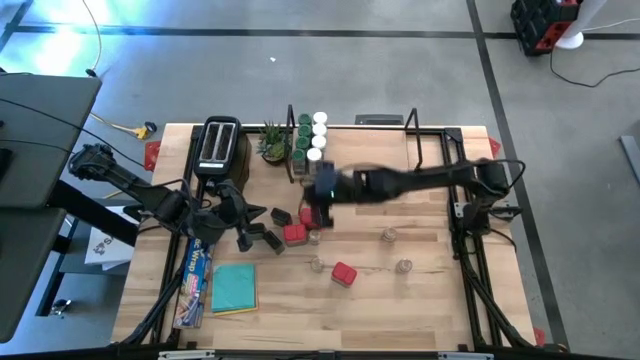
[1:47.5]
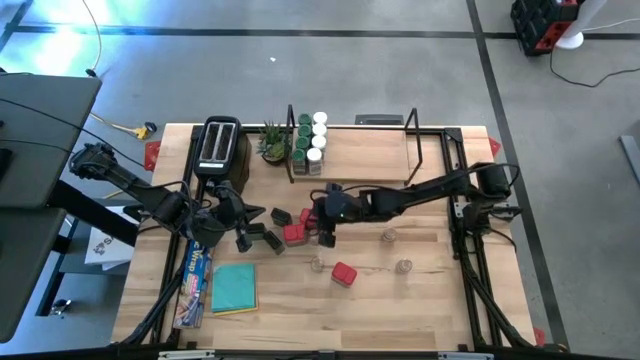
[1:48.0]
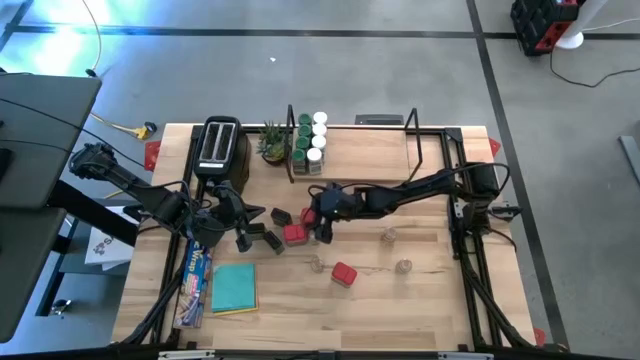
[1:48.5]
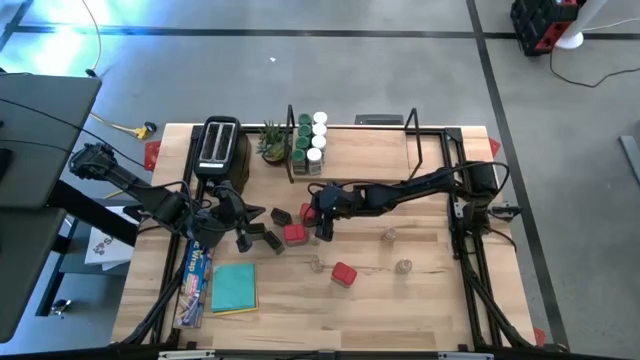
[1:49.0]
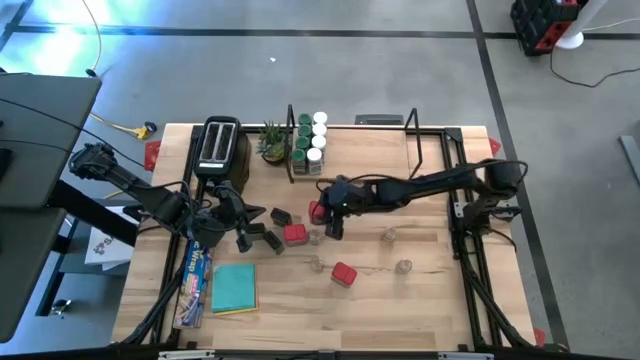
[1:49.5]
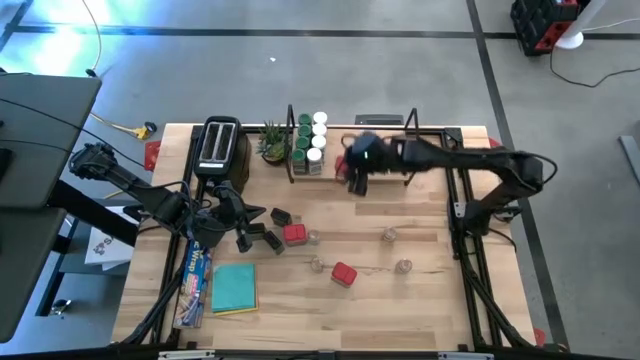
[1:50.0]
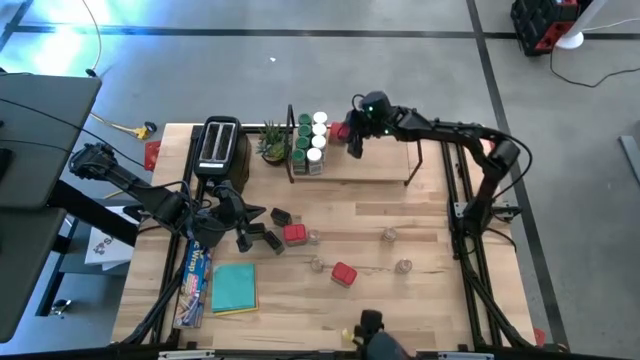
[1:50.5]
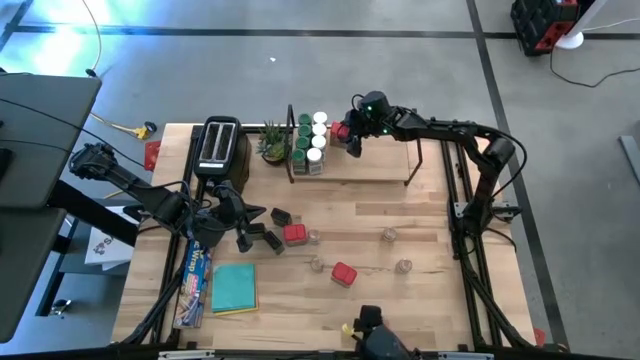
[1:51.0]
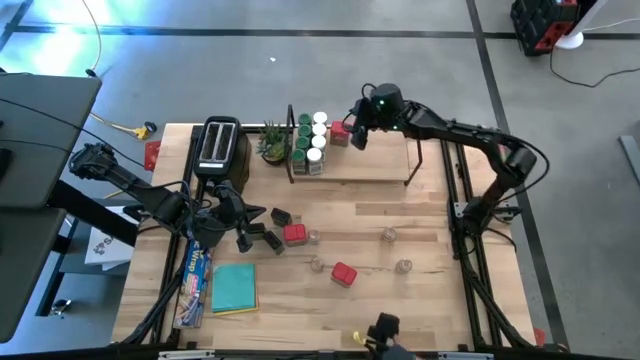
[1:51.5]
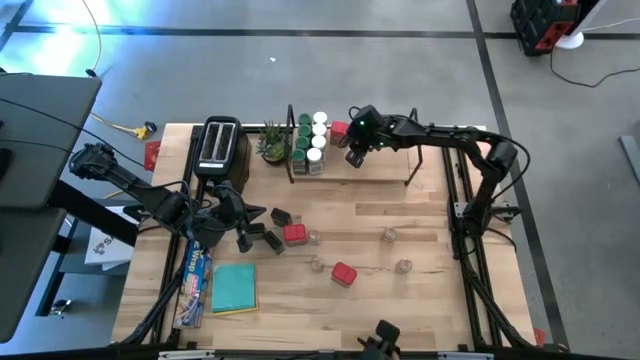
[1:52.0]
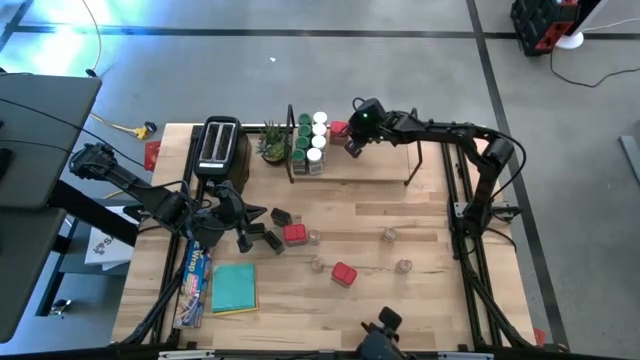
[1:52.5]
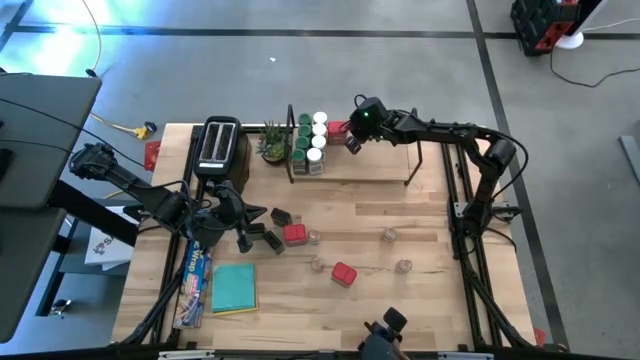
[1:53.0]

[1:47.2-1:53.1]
Task: Shelf spices
Put the top red seasoning can on the shelf

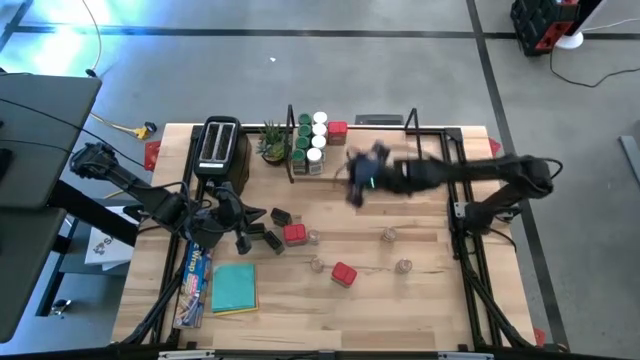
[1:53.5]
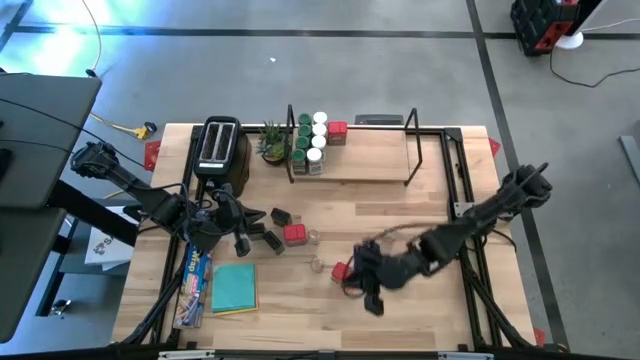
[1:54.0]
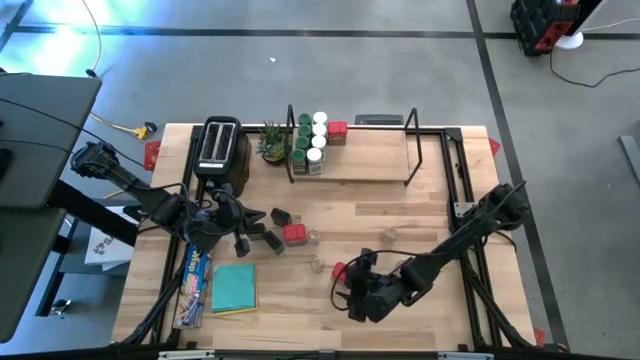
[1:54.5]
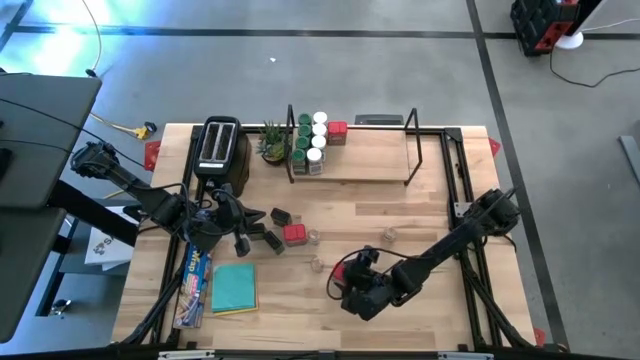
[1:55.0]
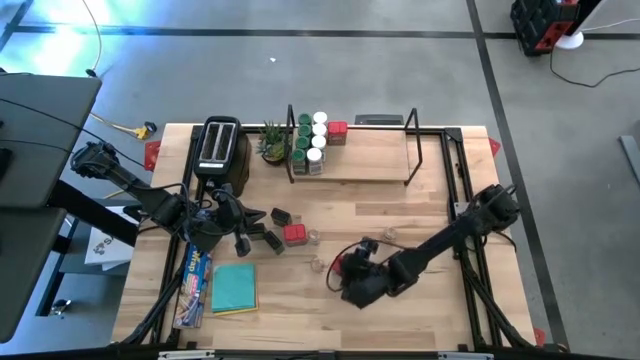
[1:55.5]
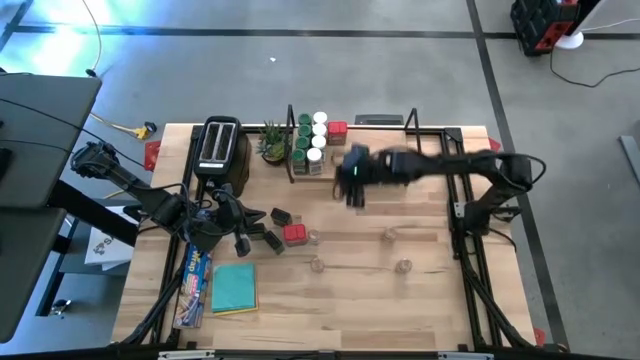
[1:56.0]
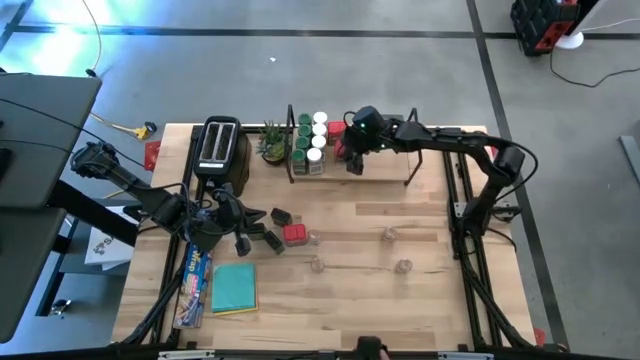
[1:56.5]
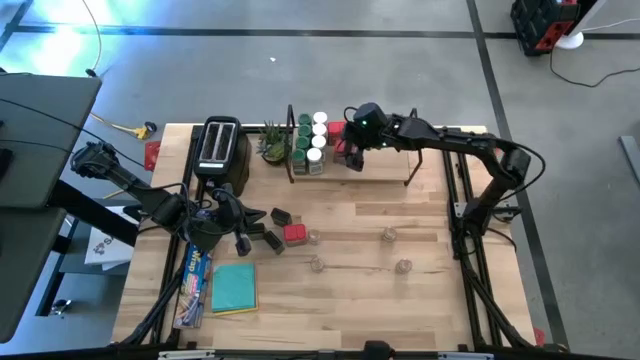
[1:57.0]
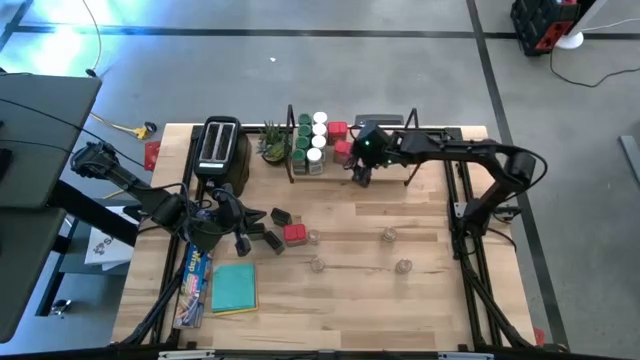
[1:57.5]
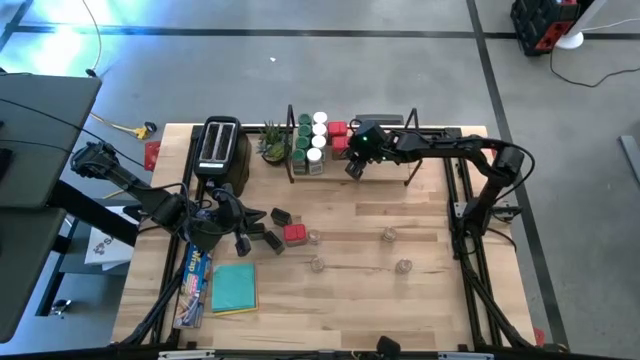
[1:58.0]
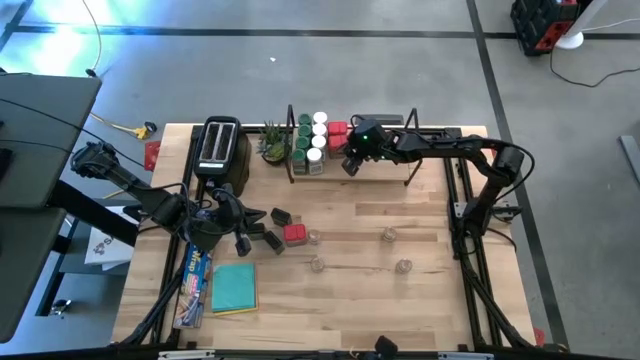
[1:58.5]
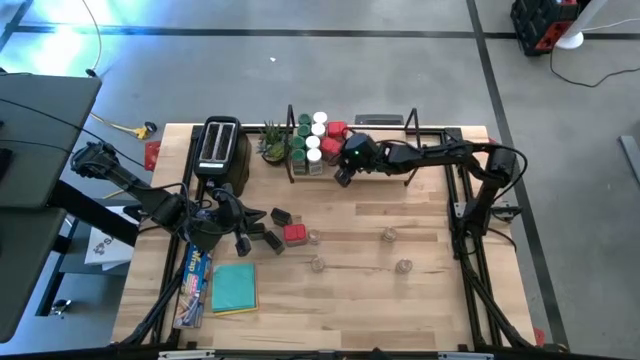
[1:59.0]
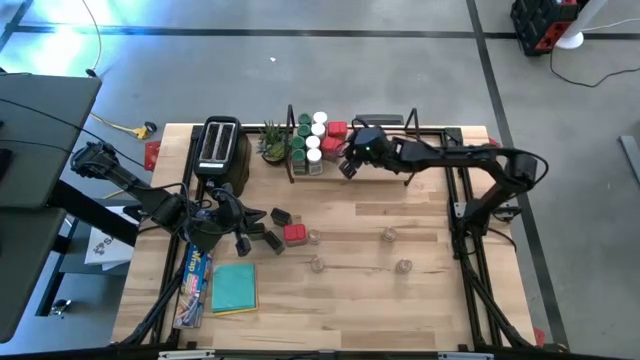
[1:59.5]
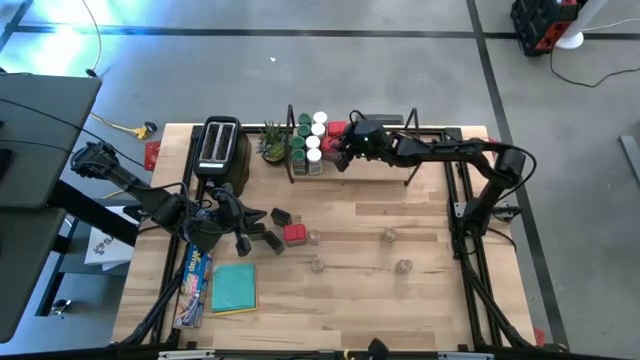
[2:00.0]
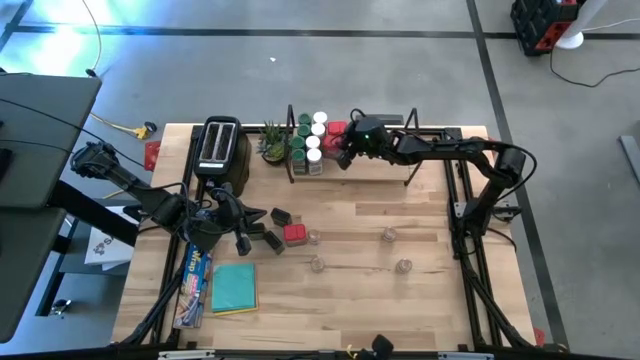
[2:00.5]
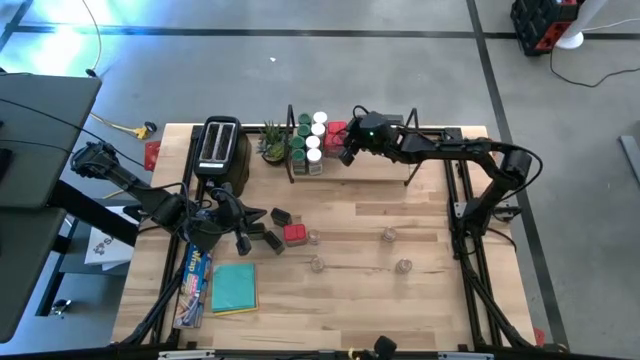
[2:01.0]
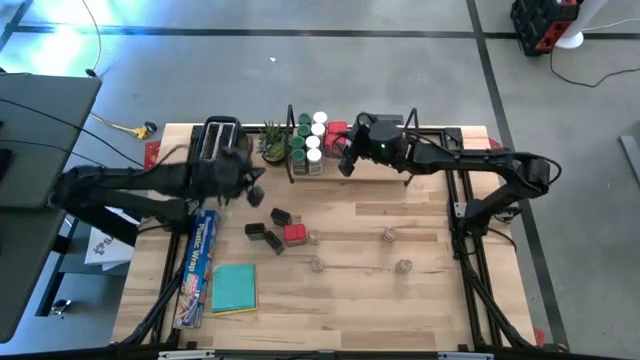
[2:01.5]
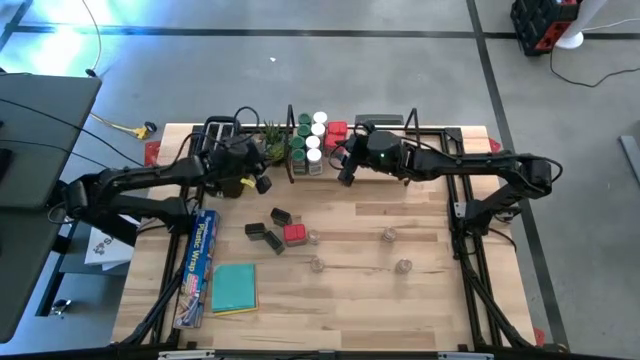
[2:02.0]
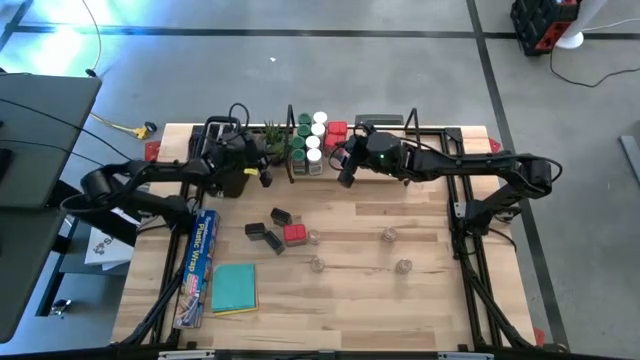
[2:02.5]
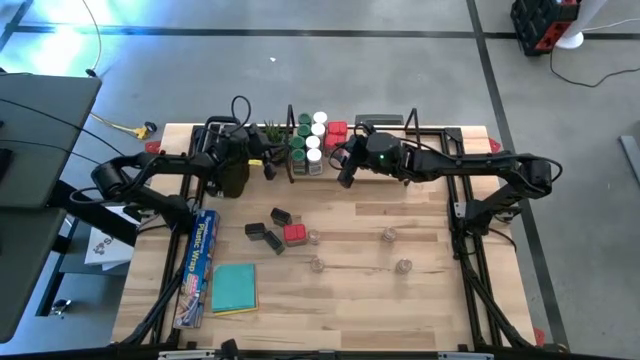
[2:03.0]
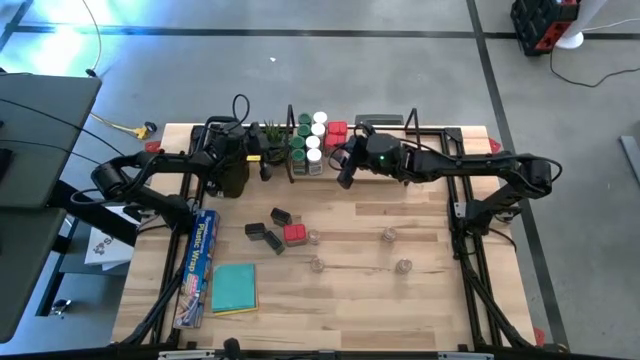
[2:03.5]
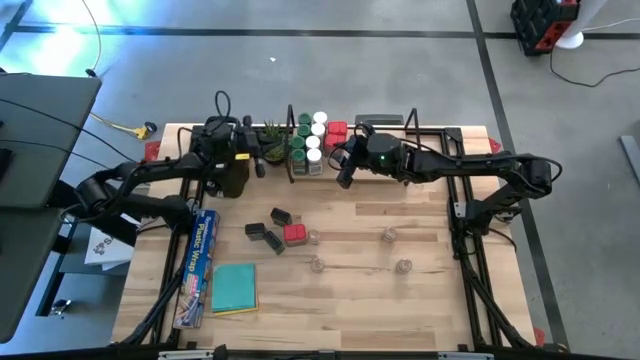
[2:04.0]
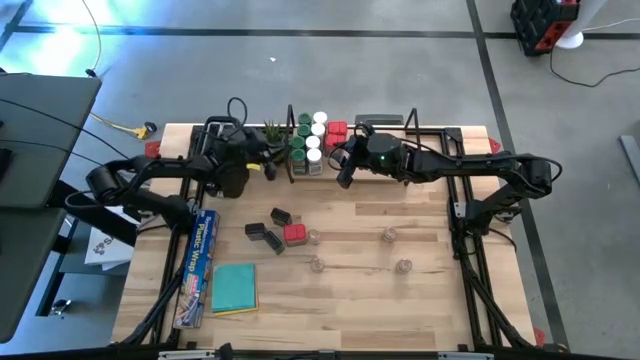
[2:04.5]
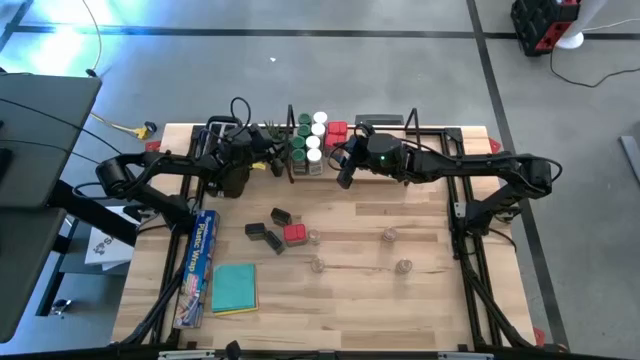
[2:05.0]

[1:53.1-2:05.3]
Put the bottom red seasoning can on the shelf aligned with the other red seasoning can

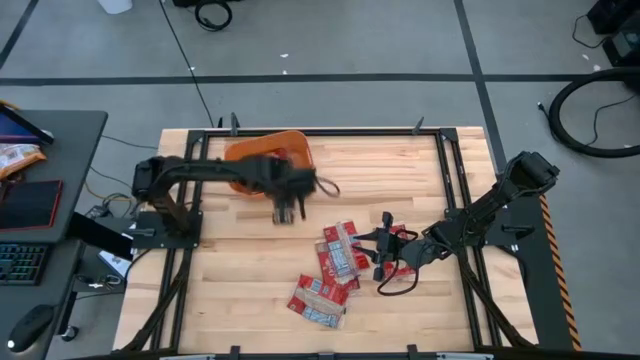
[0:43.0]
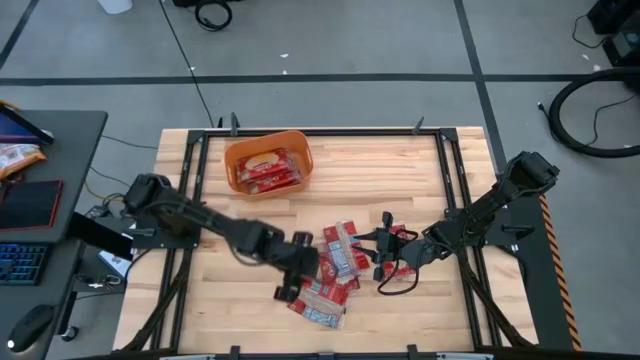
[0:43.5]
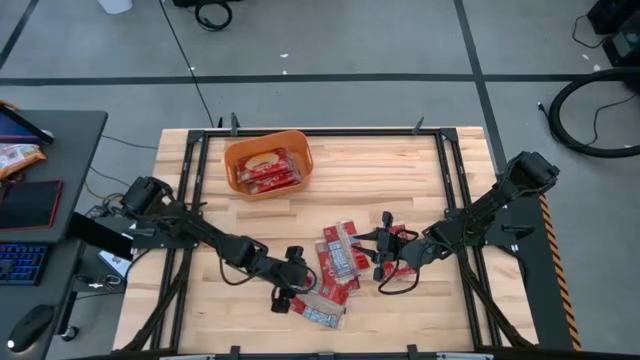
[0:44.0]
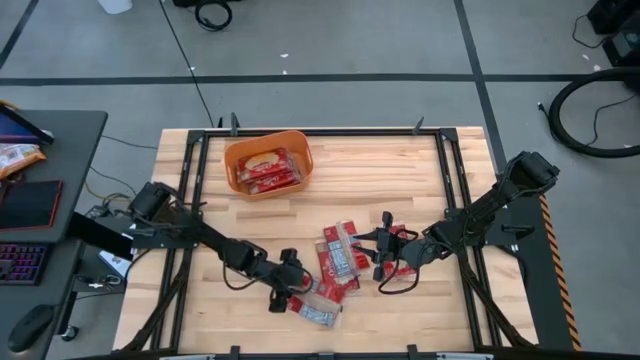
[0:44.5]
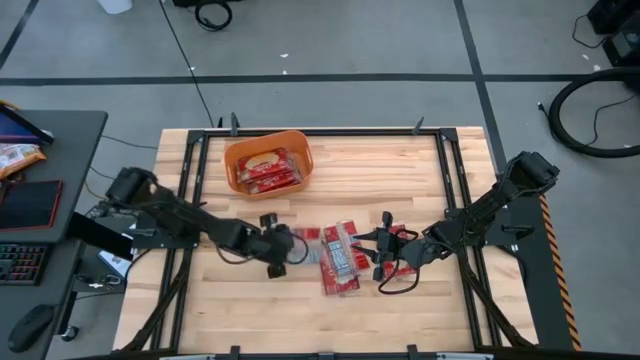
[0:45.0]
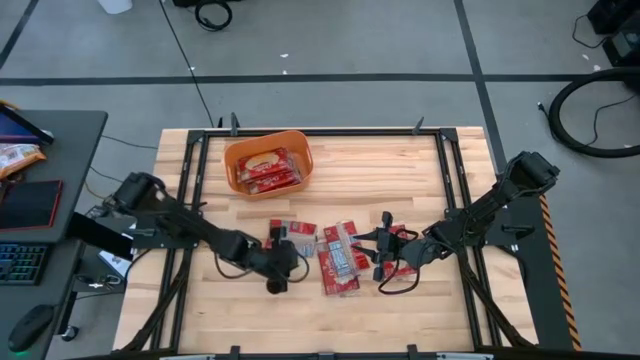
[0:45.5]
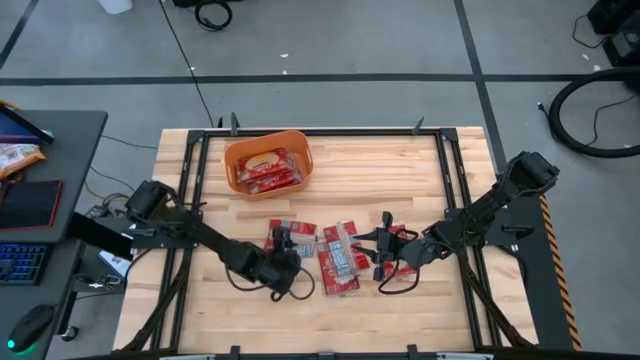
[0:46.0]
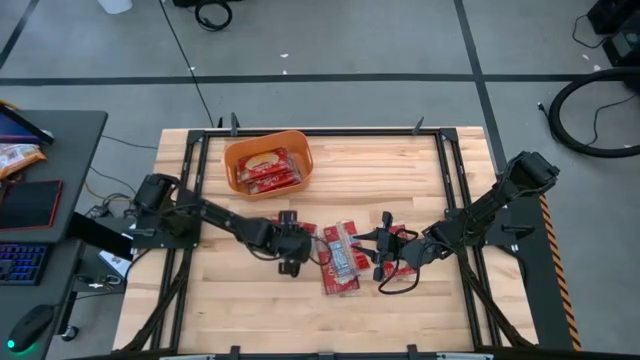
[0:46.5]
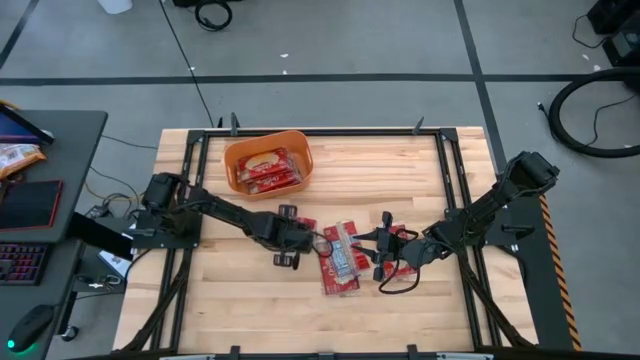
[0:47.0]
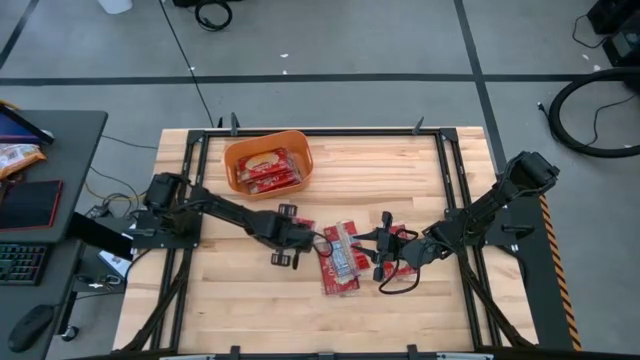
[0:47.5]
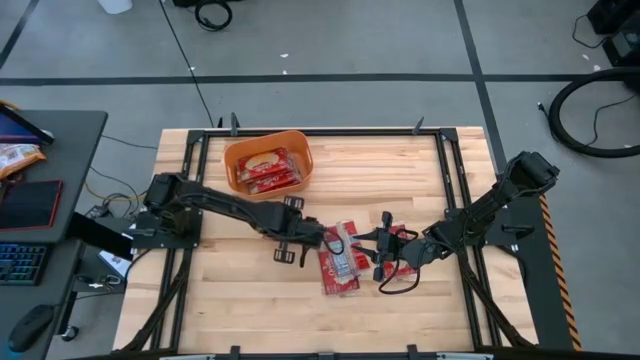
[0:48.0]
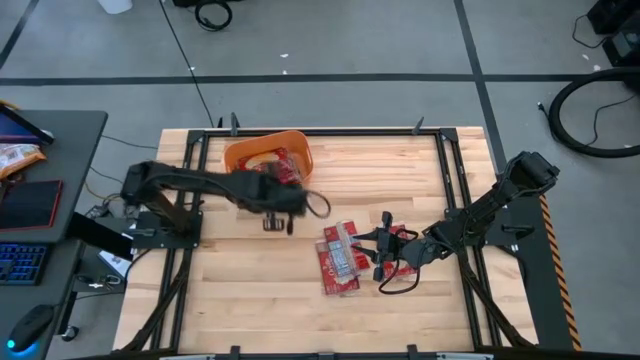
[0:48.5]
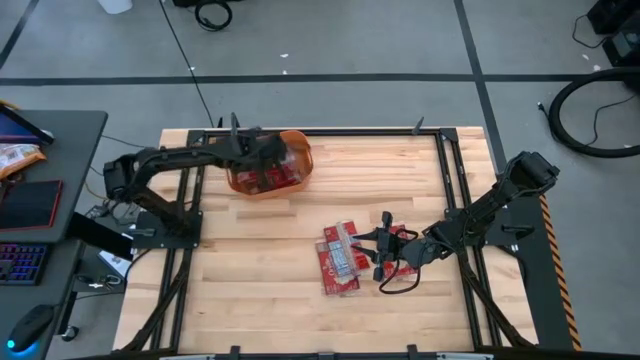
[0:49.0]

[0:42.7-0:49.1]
Task: Sort popcorn bags into baskets
Put the red popcorn bag into the orange bin
